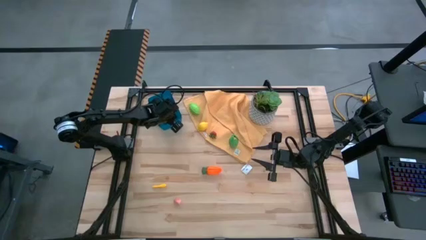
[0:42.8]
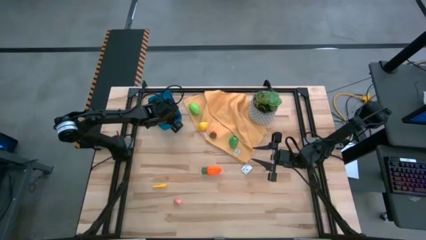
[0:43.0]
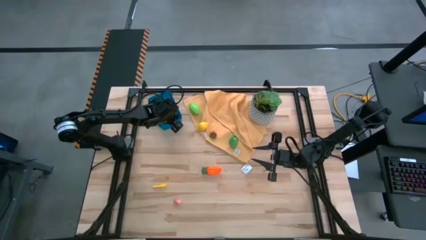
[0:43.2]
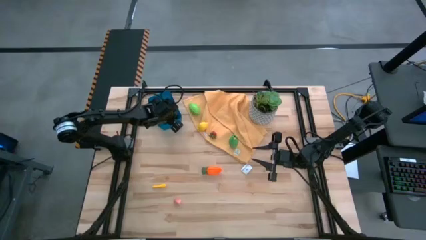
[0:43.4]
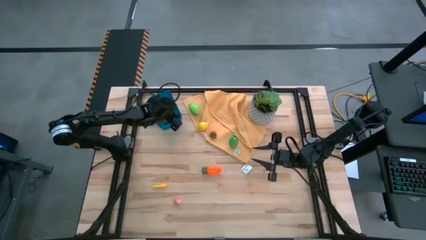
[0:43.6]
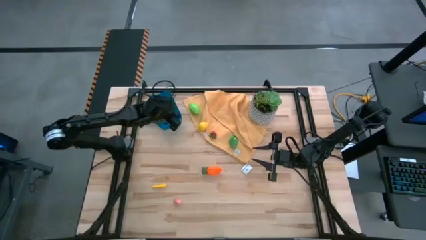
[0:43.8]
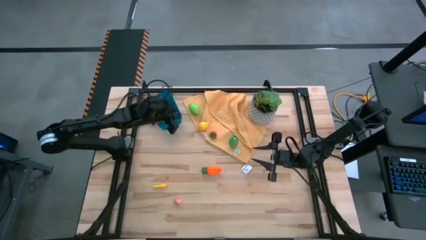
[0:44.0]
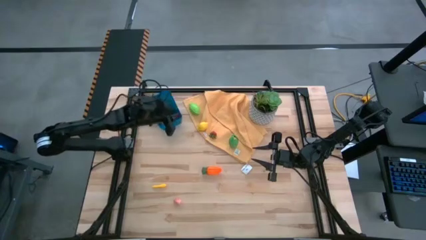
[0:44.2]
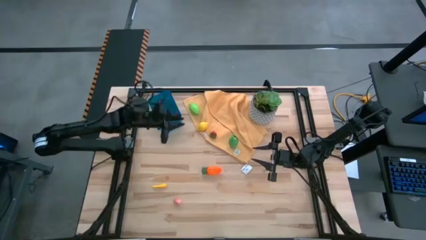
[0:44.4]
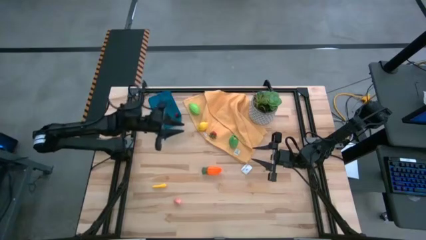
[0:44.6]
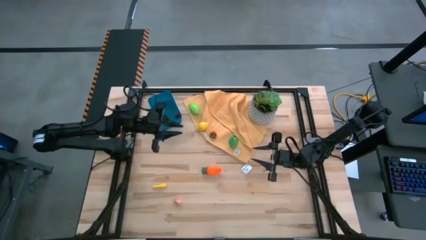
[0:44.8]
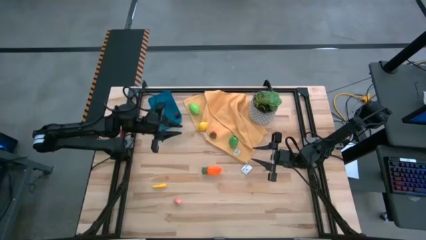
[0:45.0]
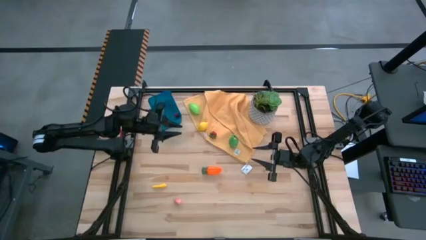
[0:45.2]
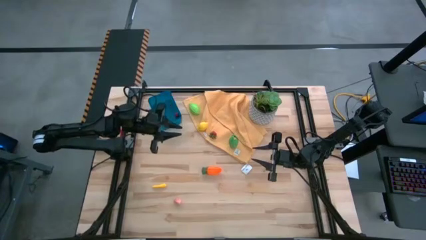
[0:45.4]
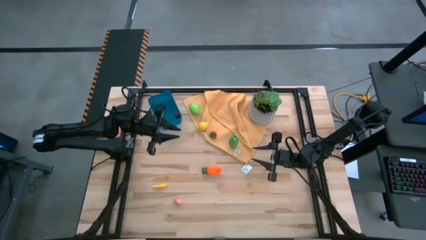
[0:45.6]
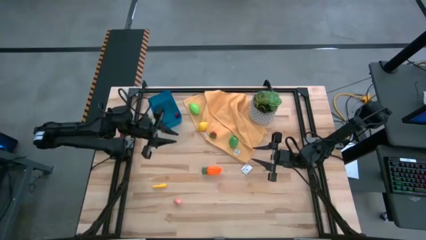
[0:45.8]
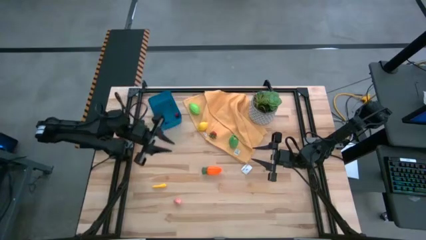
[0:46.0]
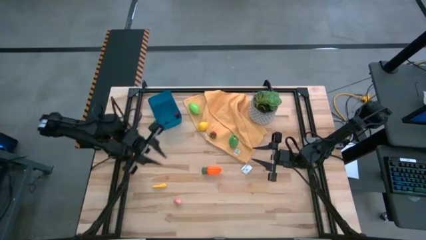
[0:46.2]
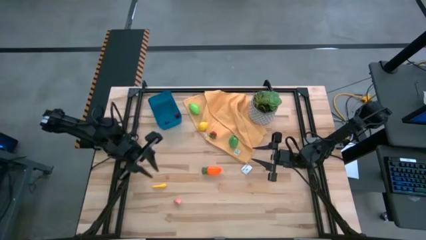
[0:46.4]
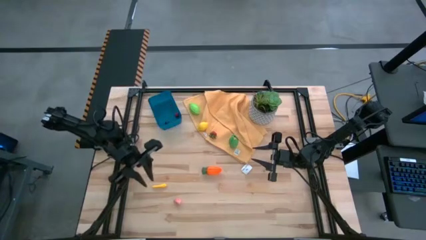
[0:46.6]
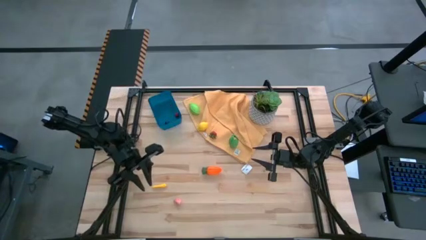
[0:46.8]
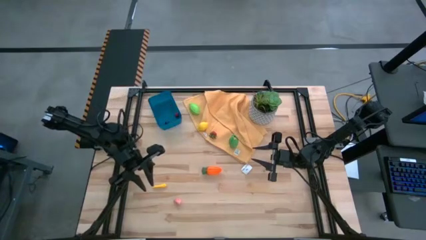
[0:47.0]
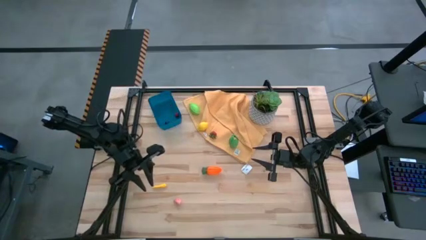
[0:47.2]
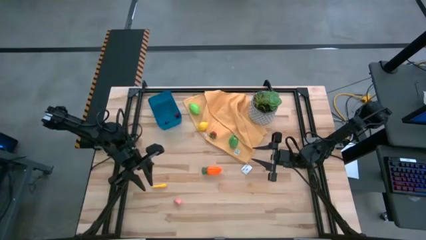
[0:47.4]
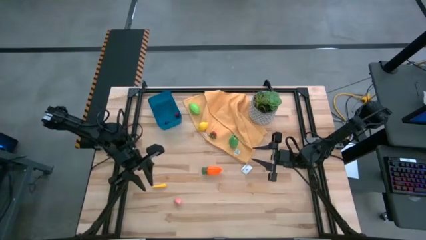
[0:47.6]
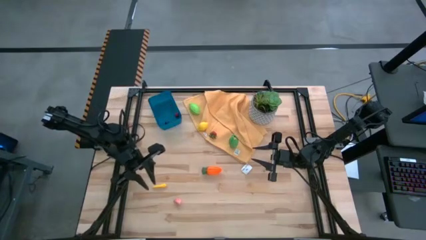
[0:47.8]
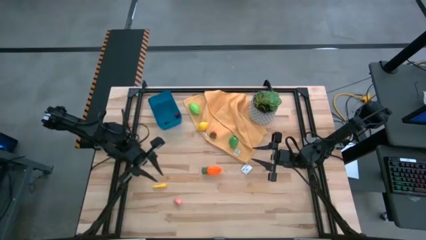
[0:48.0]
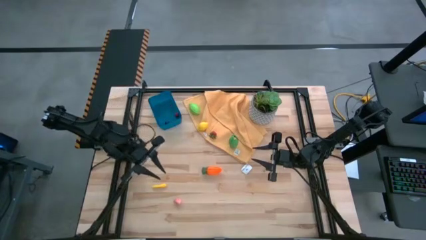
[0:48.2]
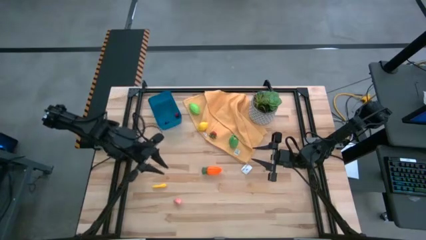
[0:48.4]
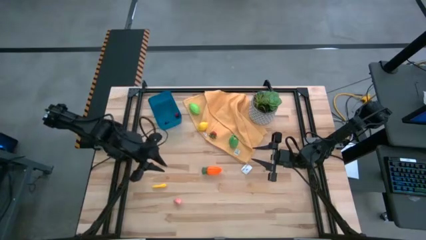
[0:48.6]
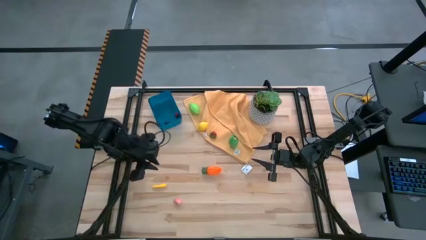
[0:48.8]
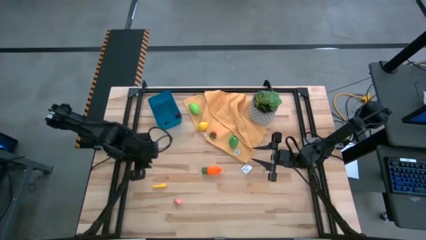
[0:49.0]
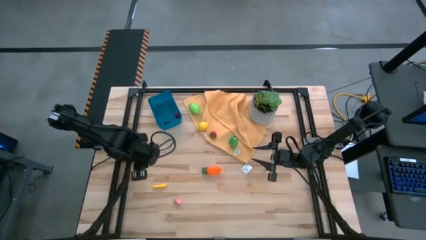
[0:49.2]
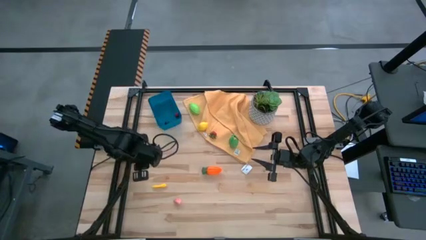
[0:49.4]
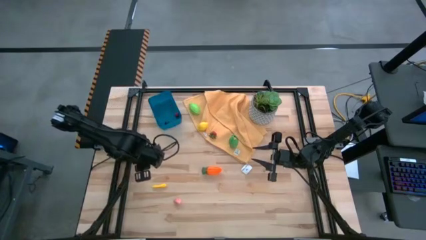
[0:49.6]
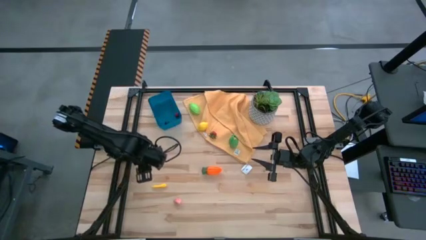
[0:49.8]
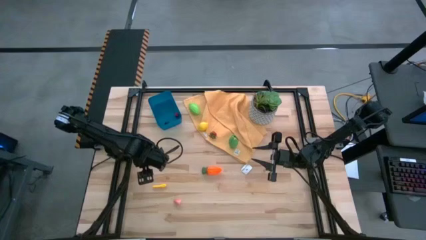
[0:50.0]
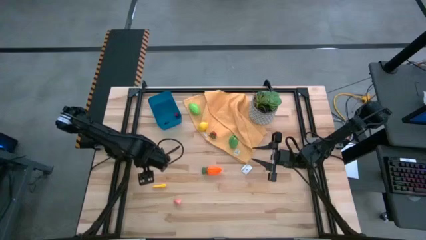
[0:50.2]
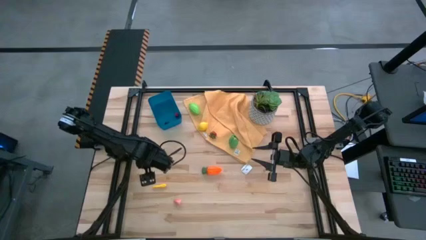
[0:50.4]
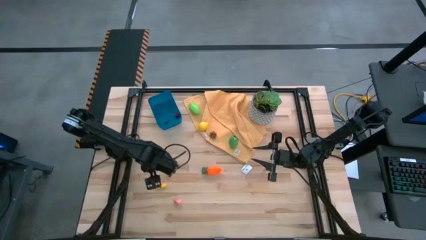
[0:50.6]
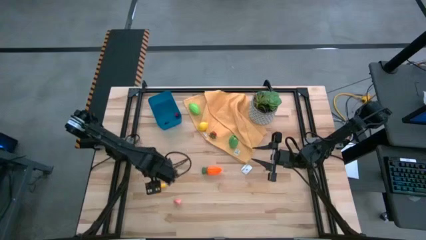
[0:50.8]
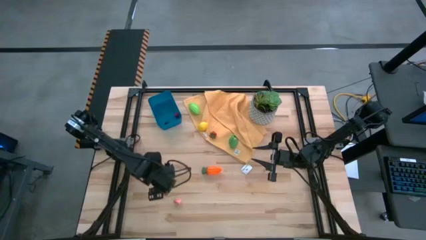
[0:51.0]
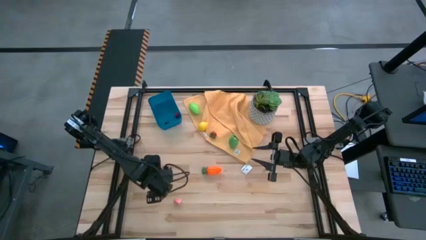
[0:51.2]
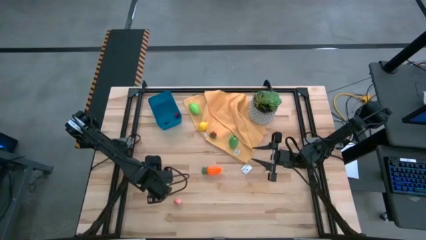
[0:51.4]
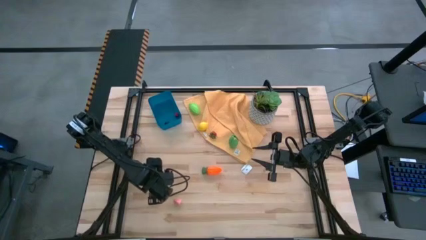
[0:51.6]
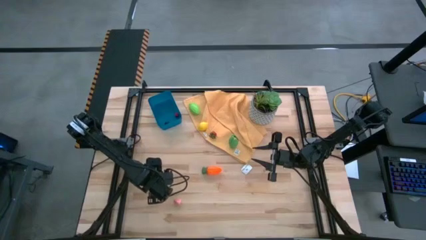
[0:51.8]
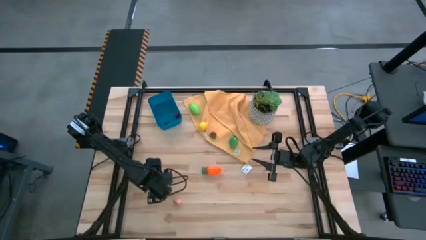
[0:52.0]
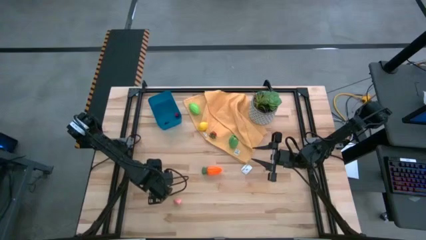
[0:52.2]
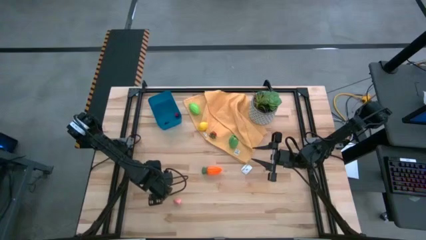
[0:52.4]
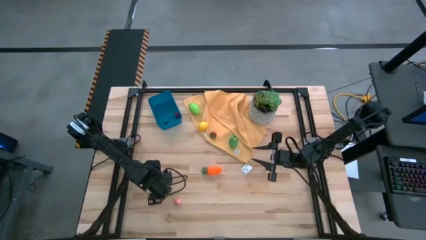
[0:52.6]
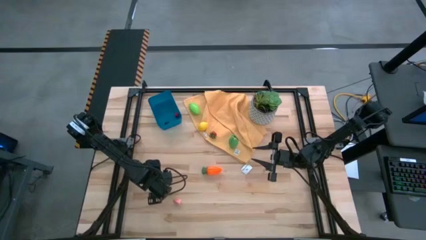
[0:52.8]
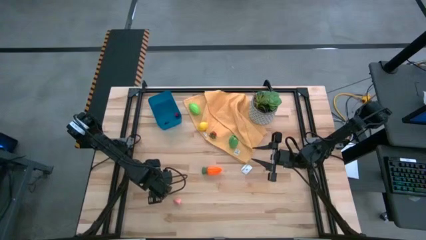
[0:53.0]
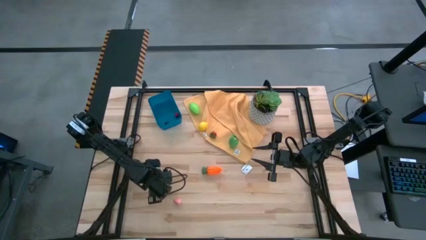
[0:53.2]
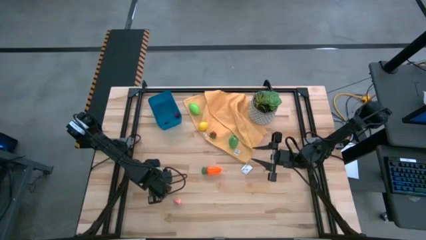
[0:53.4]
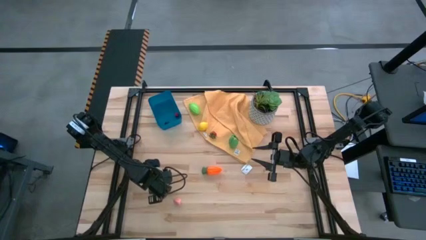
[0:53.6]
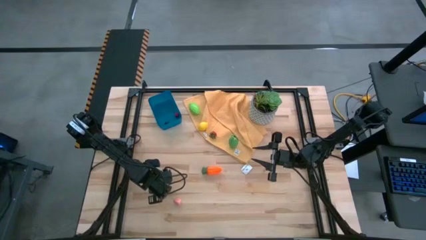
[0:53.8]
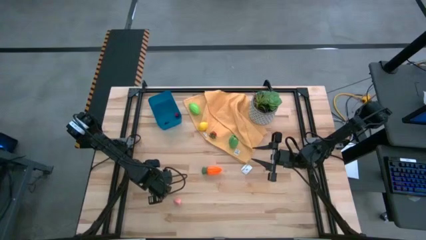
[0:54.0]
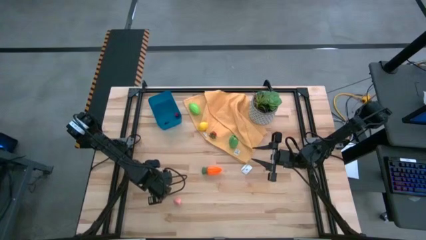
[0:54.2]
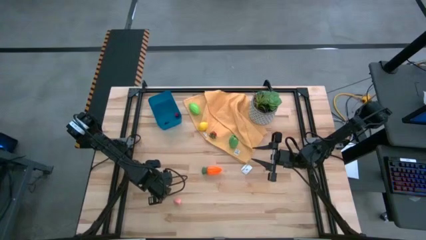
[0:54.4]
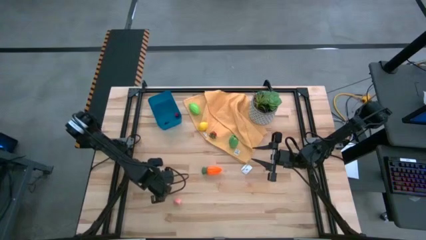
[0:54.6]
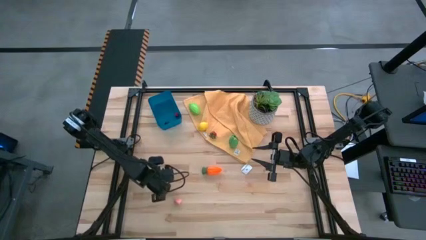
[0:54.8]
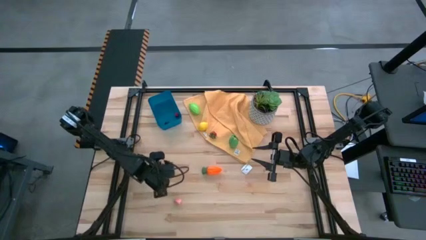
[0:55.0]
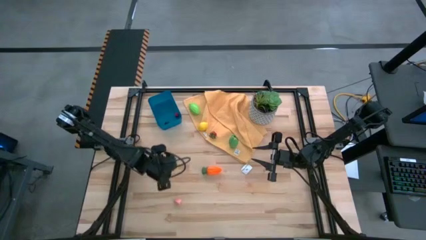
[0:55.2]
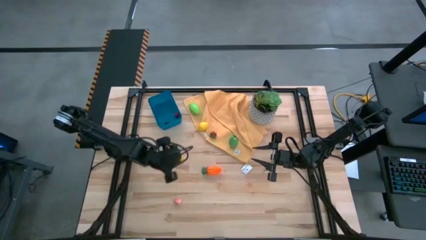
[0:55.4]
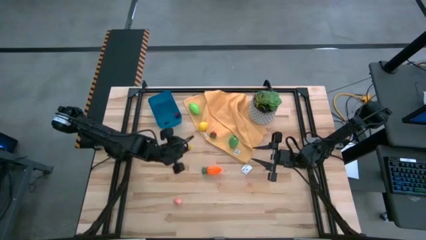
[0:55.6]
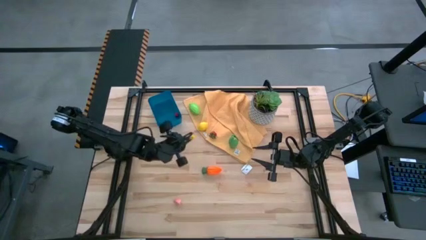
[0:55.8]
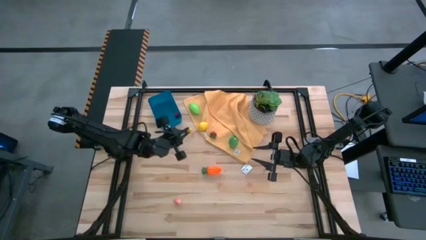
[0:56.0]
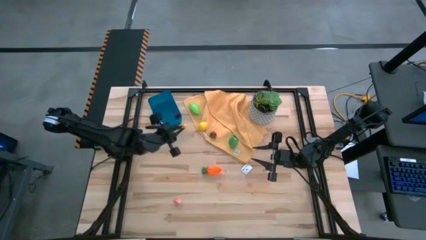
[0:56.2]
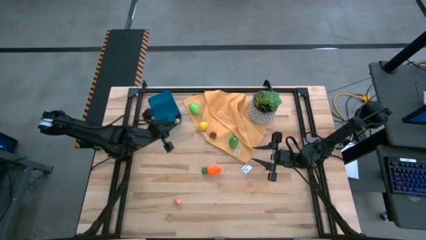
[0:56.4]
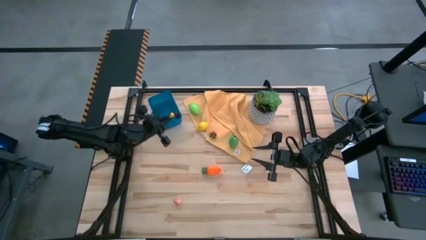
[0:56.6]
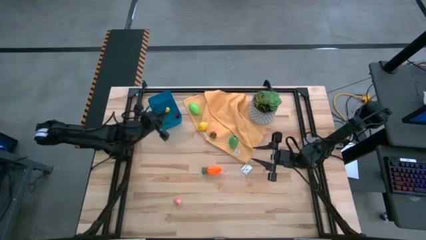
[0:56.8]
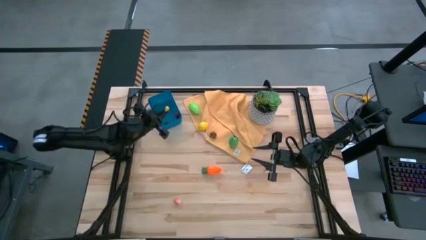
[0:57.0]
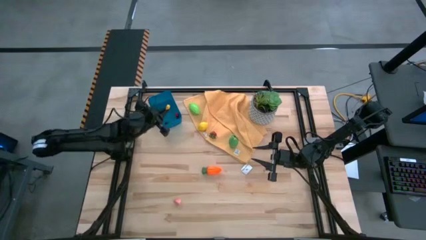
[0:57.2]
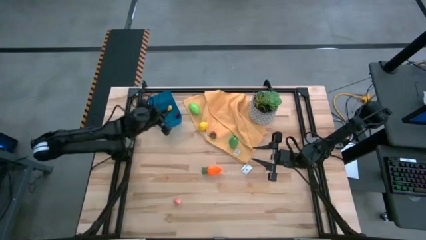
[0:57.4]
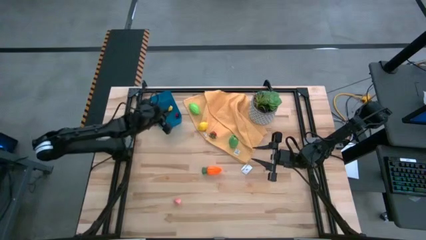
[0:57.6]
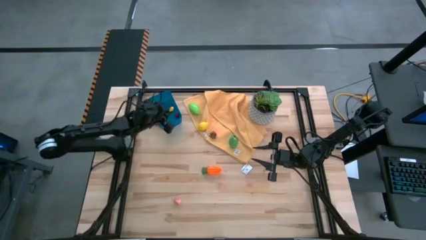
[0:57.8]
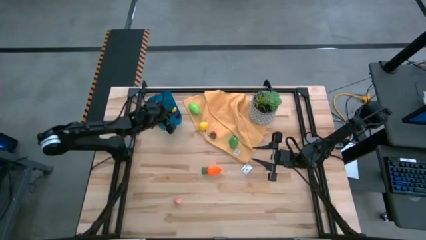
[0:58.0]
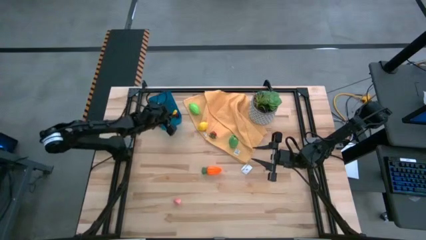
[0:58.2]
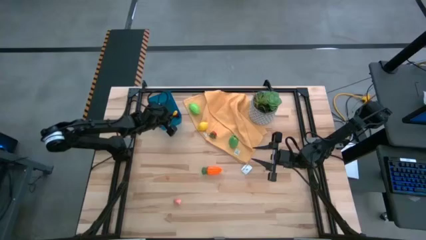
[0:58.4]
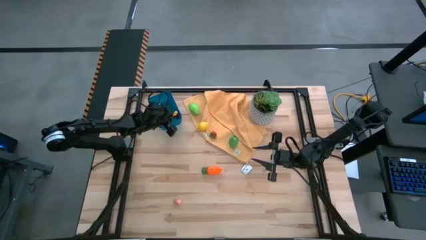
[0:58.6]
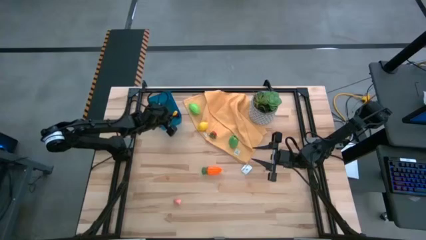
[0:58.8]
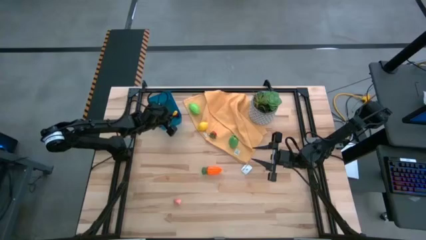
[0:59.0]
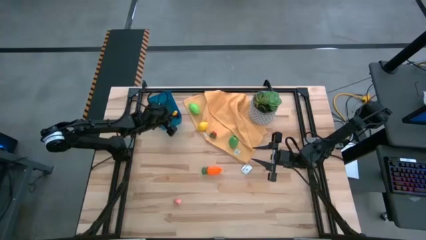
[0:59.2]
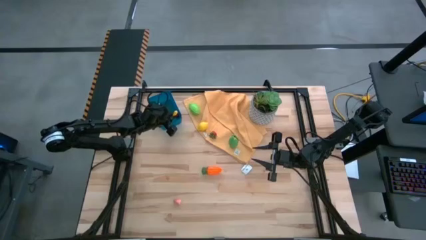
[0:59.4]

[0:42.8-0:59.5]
Task: Pick and placing Produce into tupperware
Put the yellow corn into the blue bin
